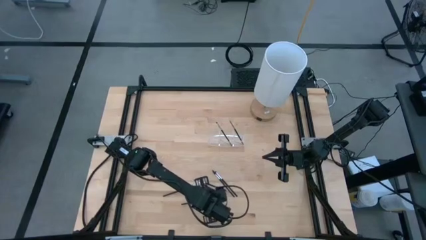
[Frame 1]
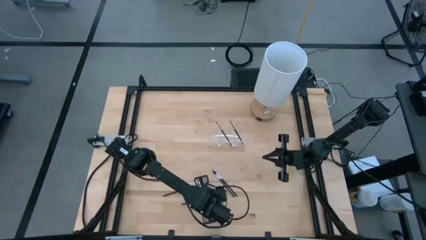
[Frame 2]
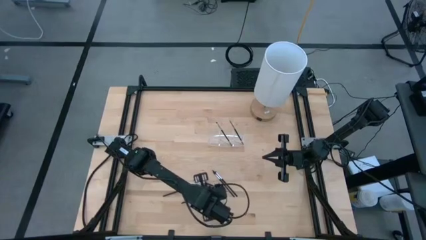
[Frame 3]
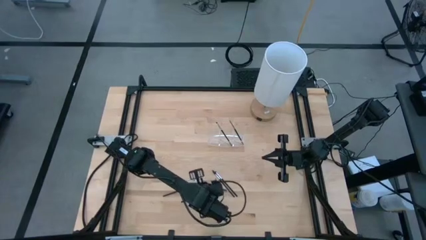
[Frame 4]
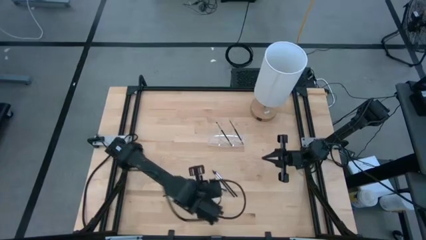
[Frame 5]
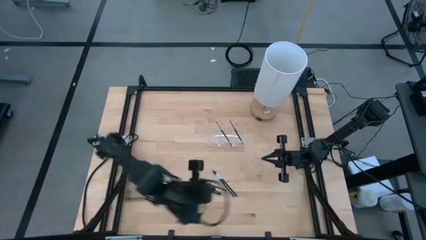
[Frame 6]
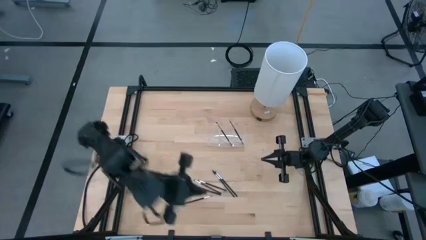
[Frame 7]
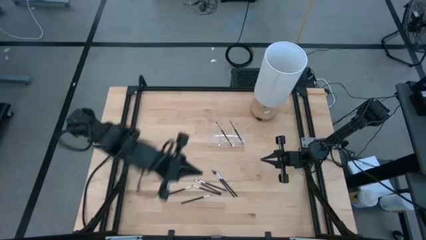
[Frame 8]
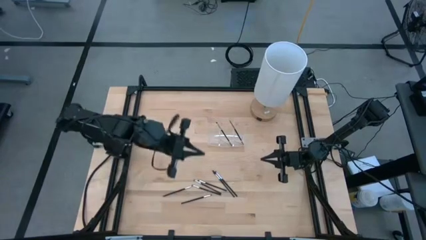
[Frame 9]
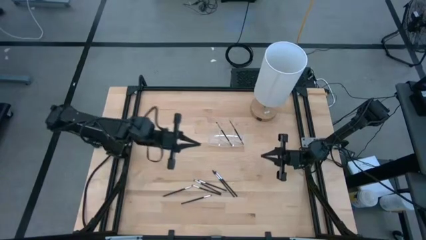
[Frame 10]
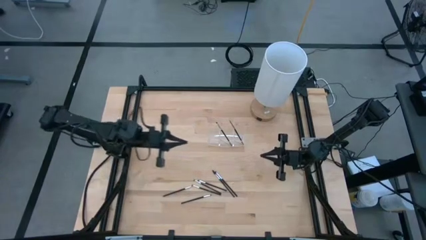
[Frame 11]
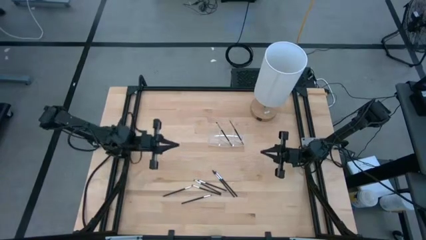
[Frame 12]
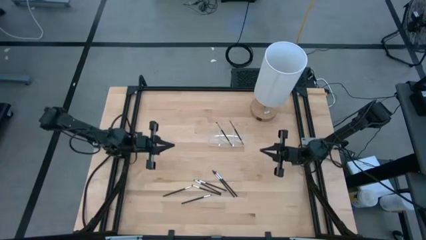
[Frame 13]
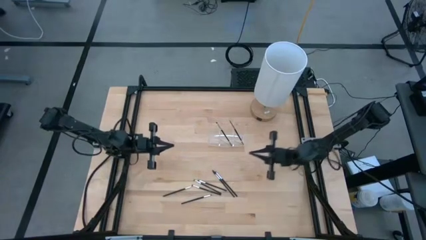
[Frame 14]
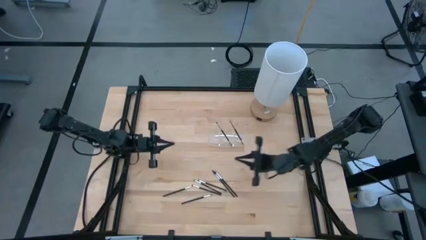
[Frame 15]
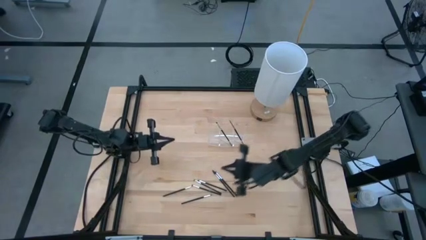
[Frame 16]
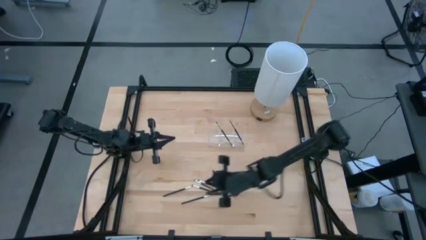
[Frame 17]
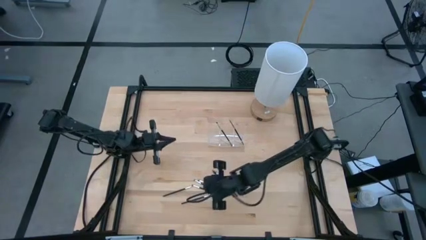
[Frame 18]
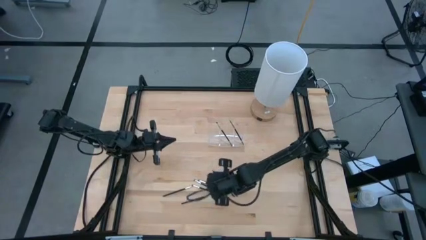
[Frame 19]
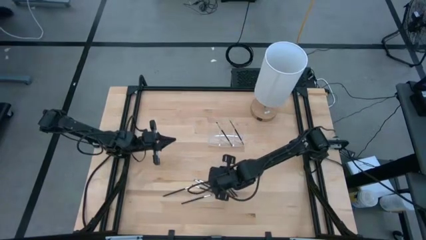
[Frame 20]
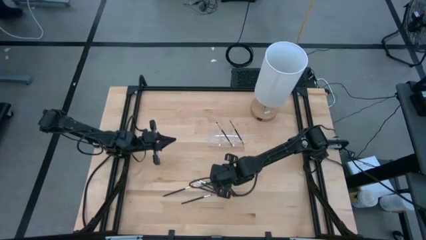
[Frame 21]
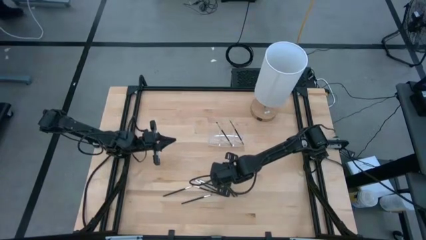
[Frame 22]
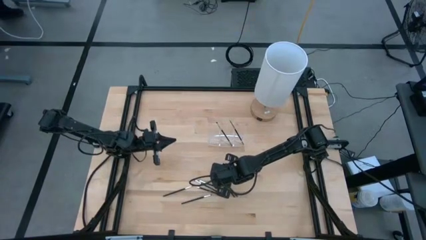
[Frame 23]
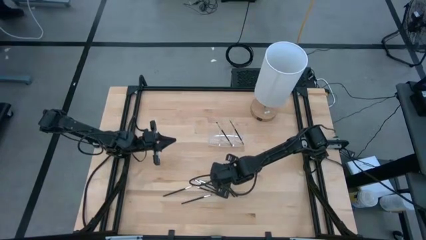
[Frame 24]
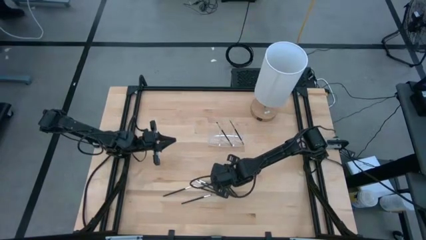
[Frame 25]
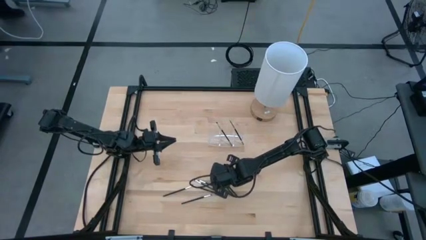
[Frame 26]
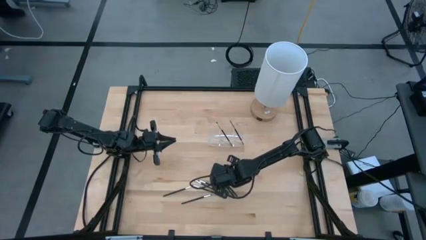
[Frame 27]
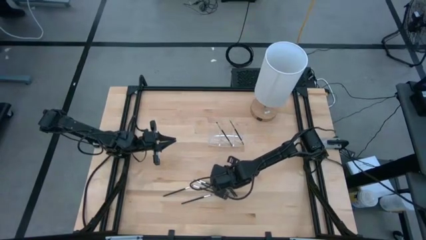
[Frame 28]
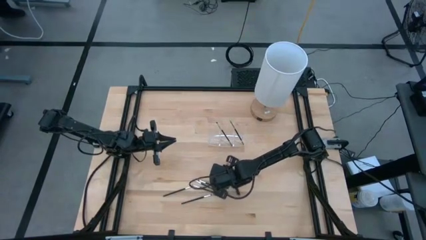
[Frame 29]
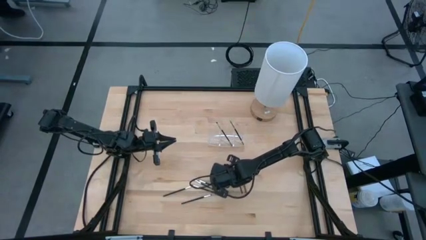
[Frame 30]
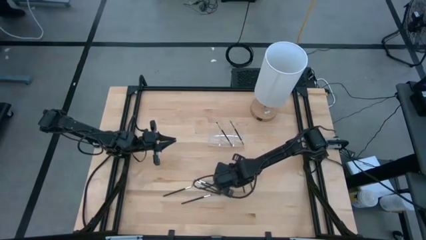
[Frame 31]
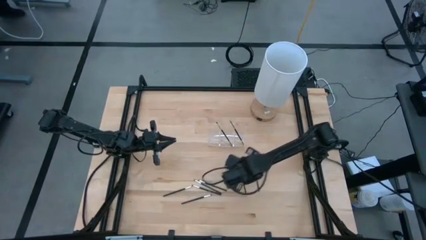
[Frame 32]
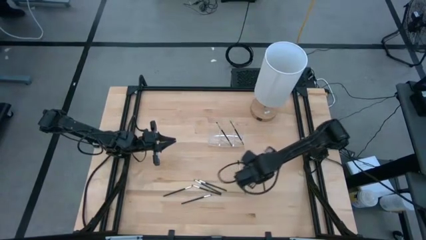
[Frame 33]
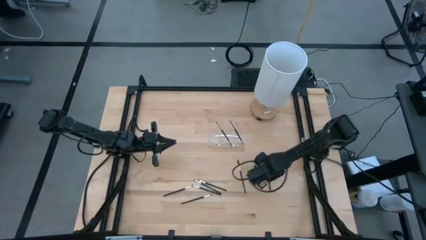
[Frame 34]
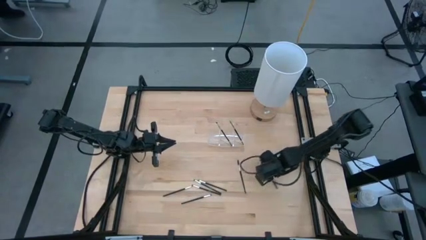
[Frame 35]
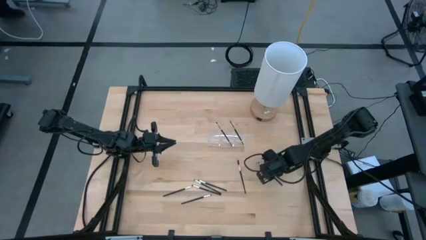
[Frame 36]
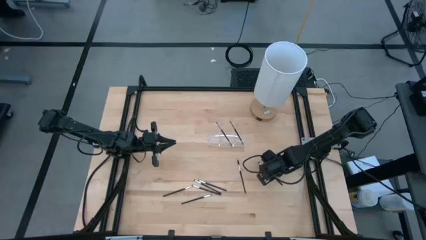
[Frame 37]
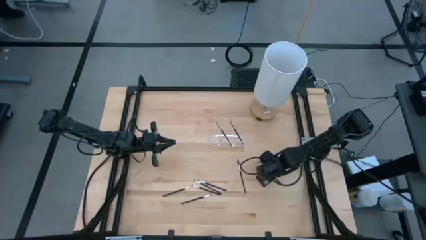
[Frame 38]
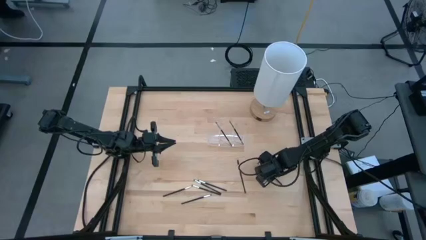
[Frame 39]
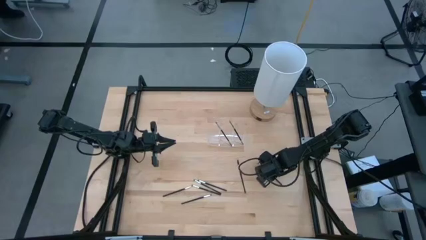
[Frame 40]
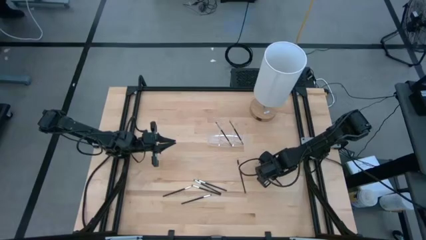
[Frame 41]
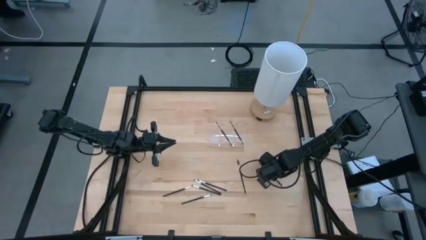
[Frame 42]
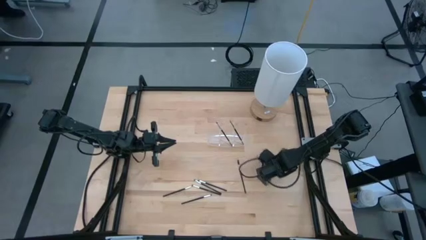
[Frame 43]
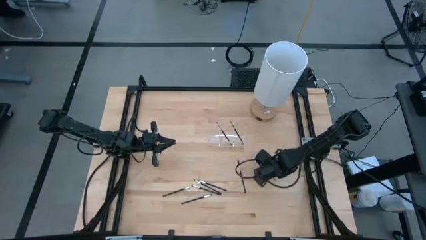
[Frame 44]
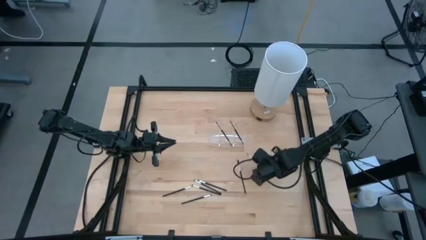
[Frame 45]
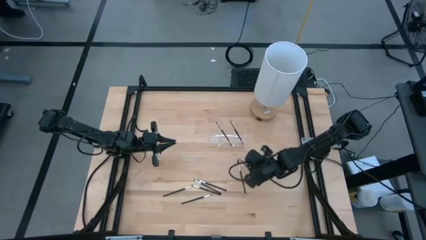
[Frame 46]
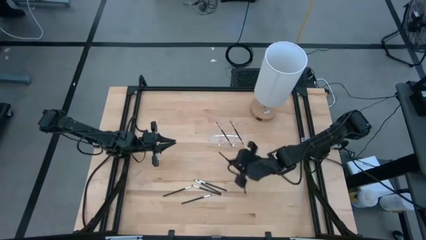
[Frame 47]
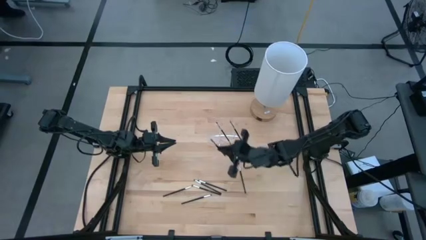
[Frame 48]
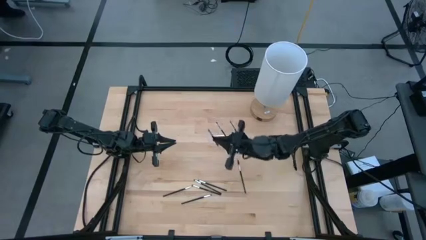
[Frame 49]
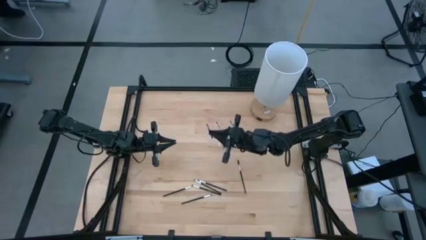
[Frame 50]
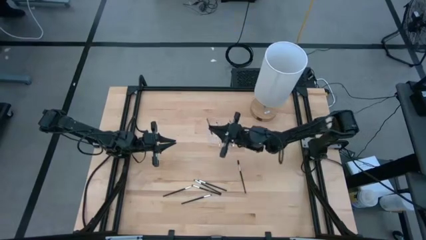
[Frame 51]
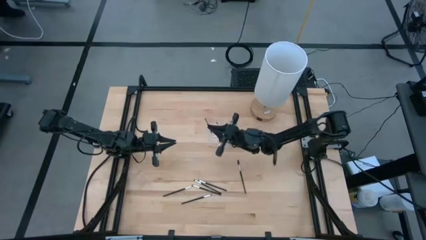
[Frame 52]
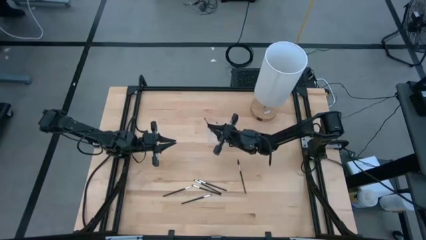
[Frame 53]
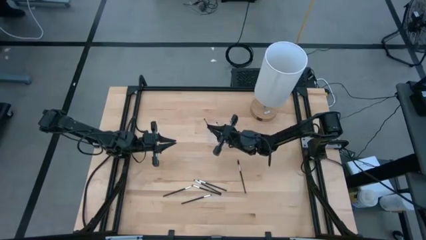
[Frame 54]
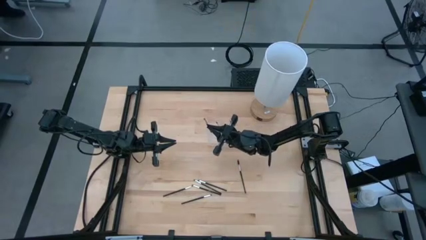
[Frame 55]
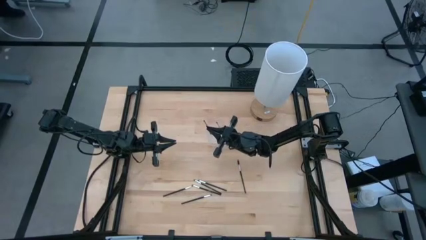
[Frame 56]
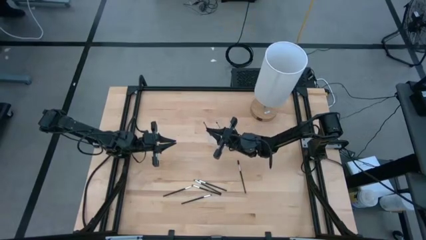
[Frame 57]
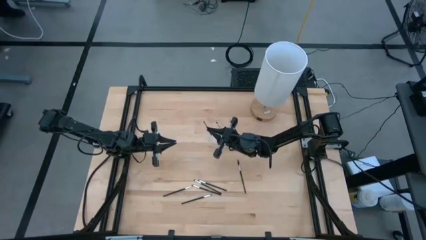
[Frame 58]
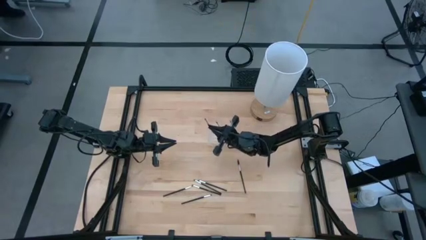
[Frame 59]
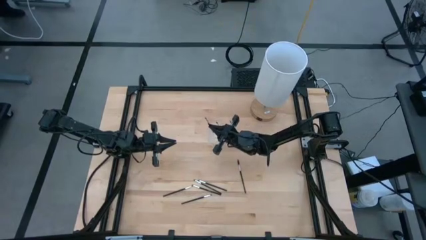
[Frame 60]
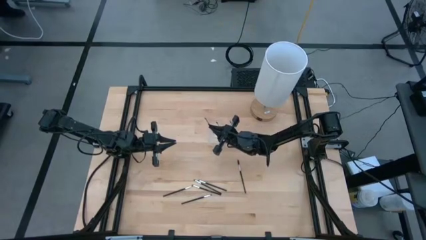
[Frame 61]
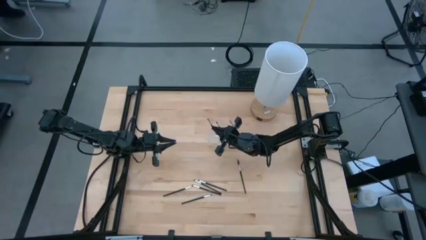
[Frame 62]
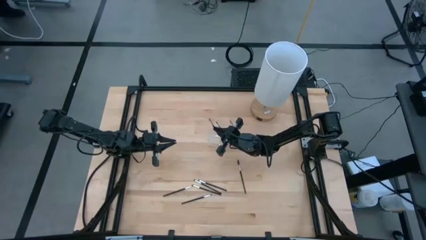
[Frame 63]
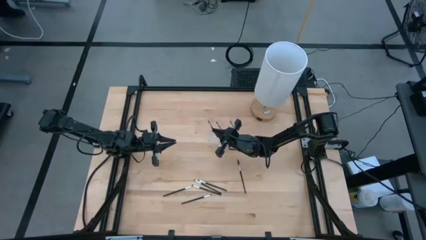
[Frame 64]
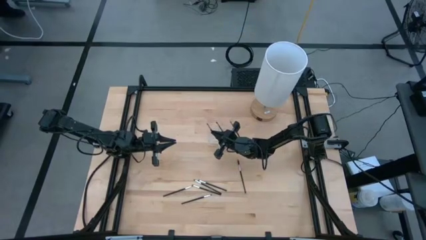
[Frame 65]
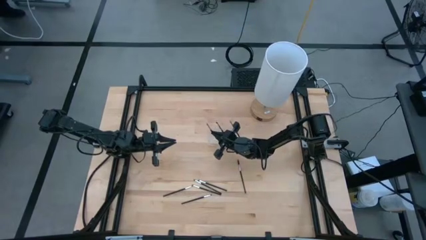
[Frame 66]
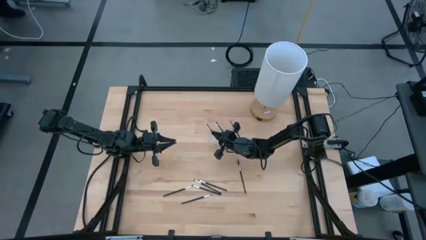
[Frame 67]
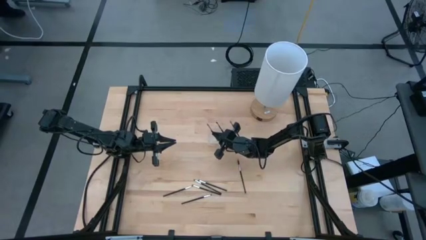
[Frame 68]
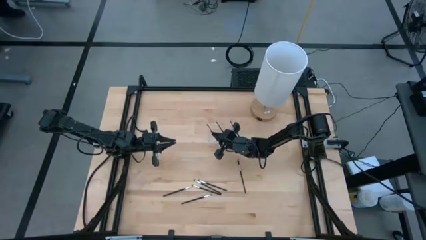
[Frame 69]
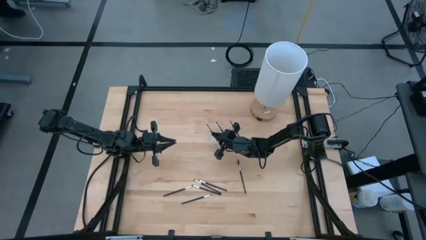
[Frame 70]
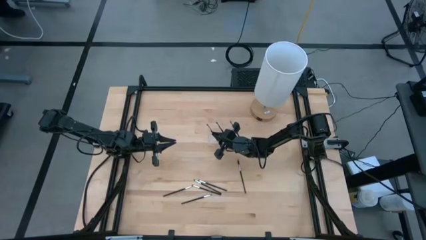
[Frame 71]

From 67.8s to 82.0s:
Task: Put items in baskets/containers
Put the black eyeshadow brush into the left section of the transparent organizer

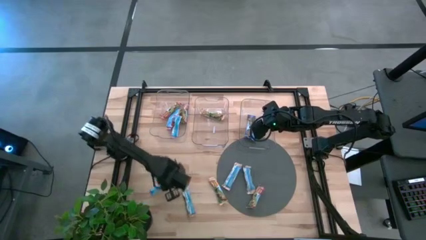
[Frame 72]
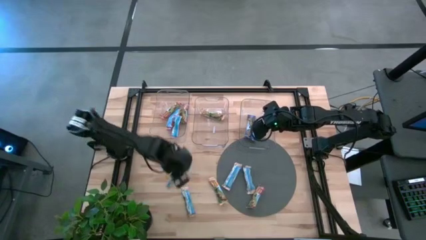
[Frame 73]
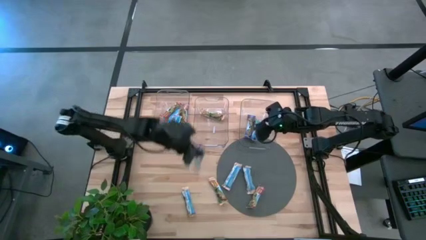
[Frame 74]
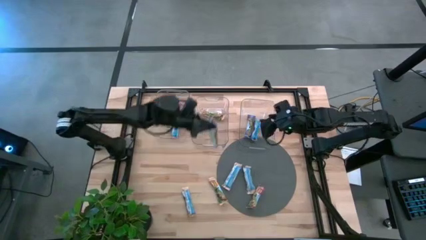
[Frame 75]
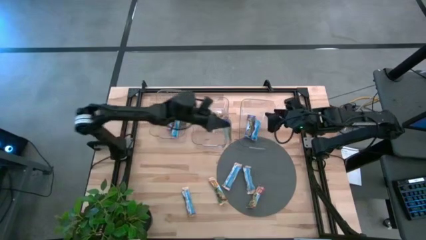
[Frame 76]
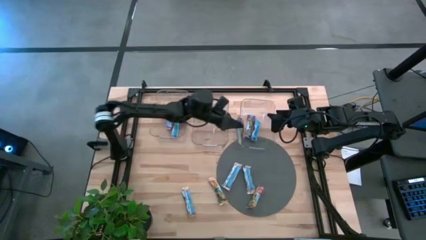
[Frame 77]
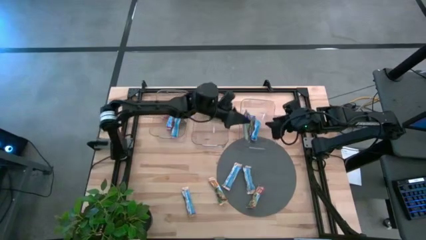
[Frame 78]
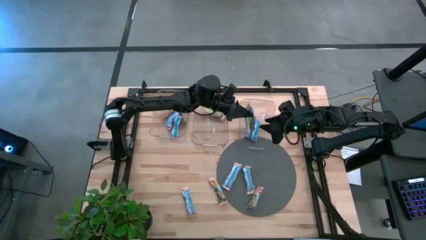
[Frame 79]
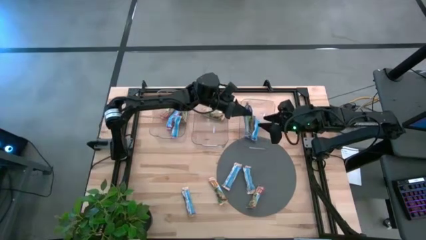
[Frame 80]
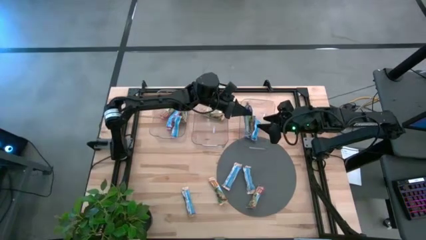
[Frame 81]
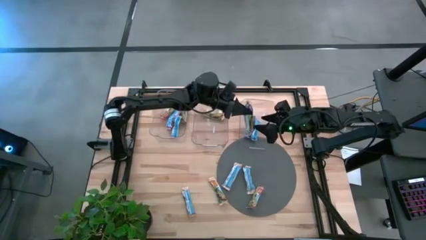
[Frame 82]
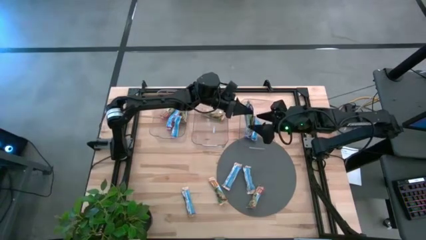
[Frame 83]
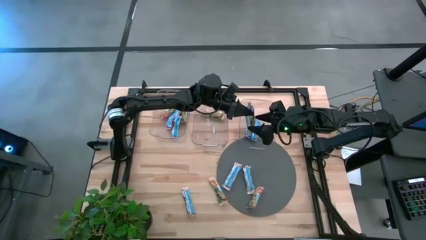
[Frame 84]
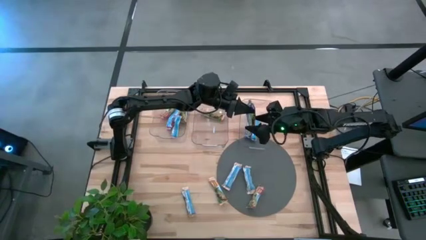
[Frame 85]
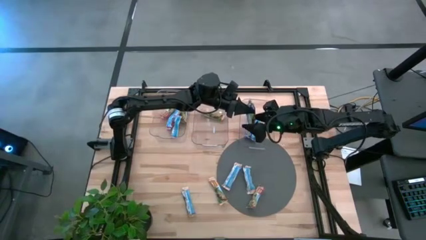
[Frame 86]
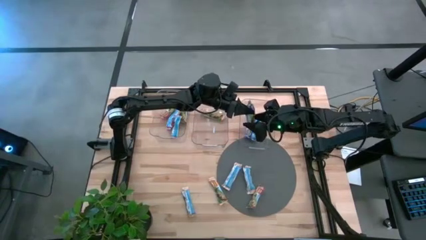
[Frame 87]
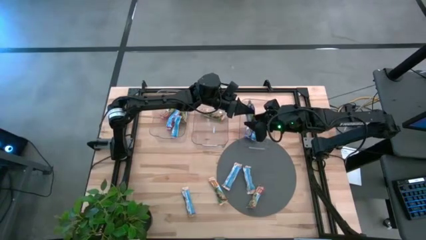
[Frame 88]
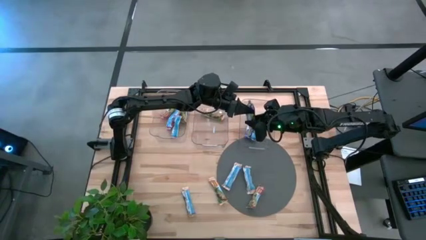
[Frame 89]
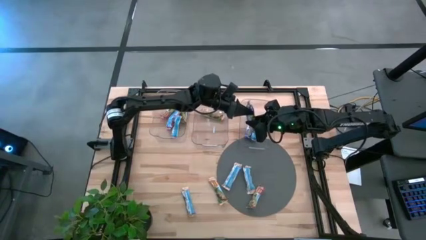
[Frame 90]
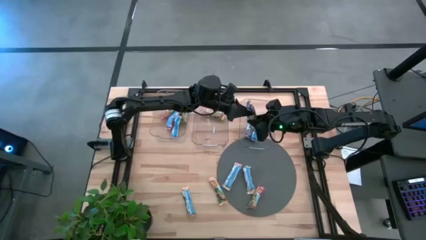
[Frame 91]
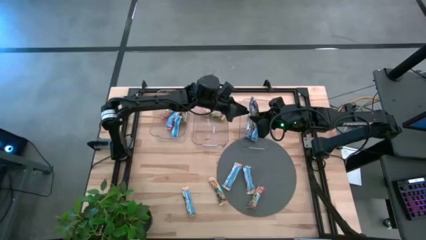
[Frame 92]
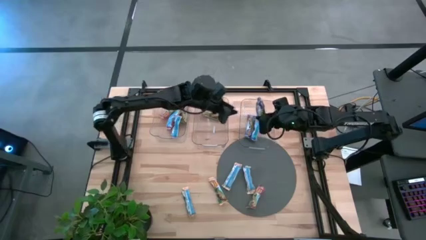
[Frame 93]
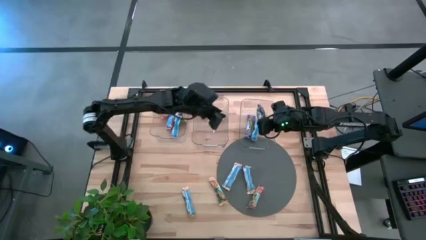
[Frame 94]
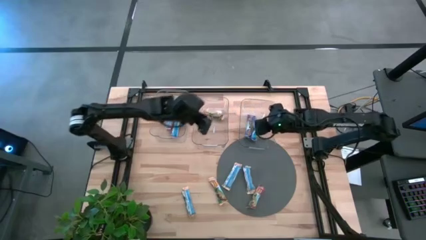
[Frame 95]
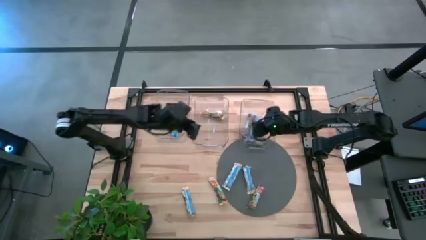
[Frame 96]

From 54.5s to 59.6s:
Task: Pick and place Granola Bars by type
Put the blue snack bar into the right transparent bin
